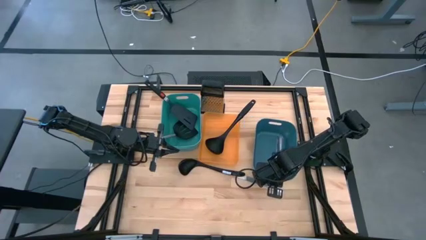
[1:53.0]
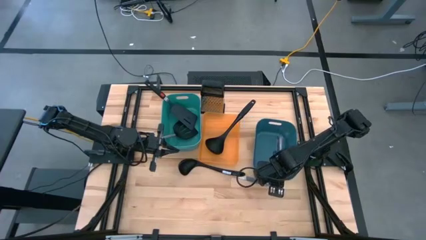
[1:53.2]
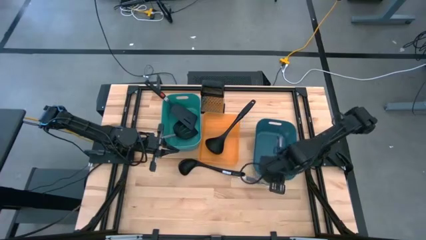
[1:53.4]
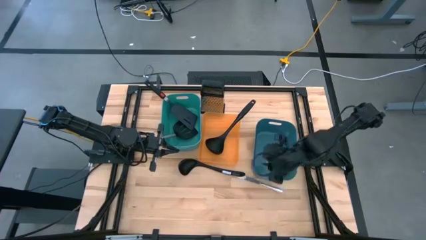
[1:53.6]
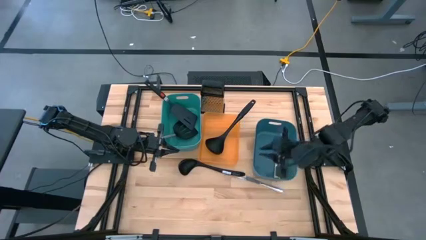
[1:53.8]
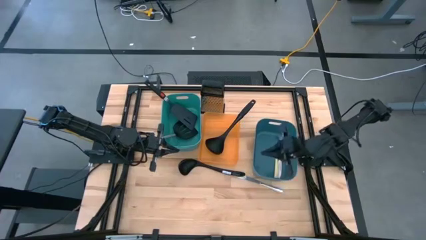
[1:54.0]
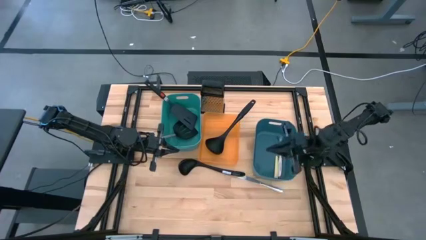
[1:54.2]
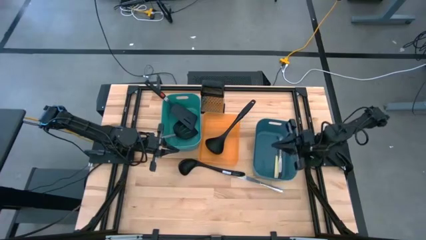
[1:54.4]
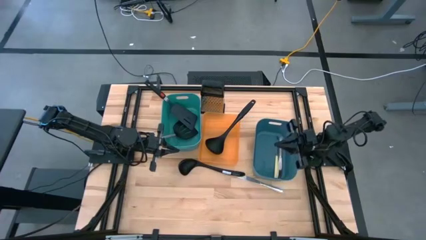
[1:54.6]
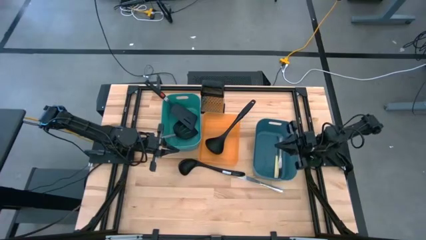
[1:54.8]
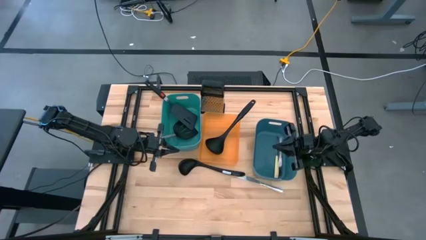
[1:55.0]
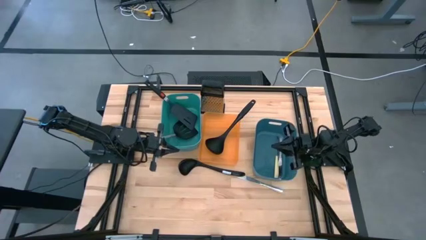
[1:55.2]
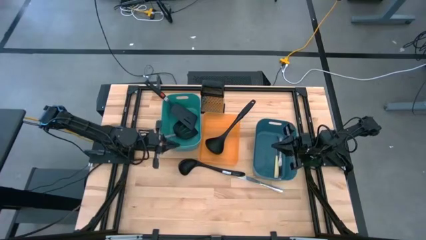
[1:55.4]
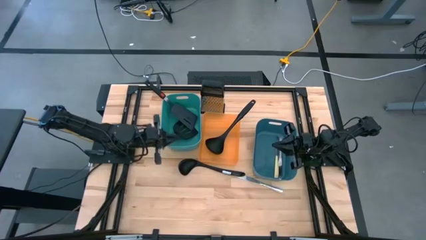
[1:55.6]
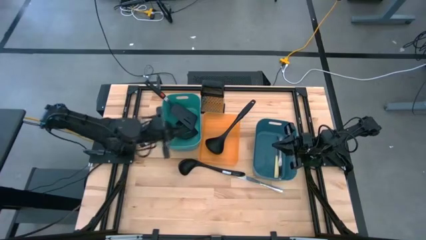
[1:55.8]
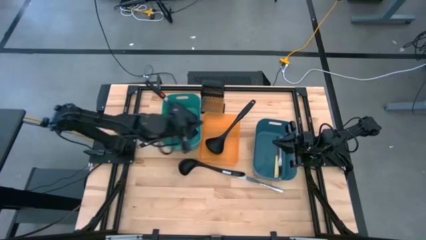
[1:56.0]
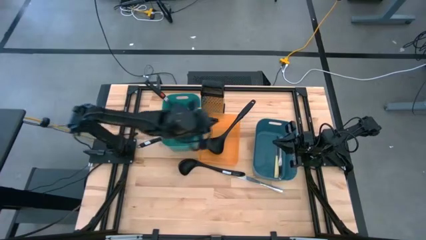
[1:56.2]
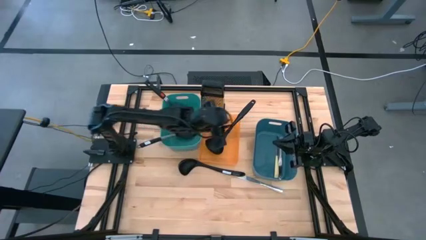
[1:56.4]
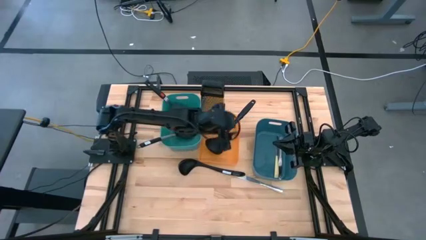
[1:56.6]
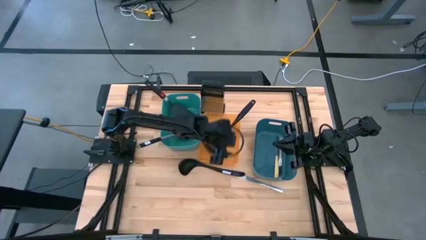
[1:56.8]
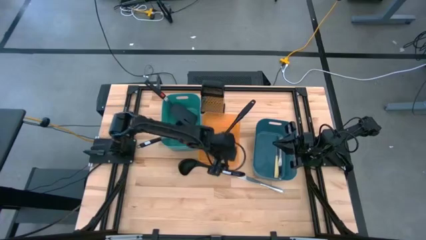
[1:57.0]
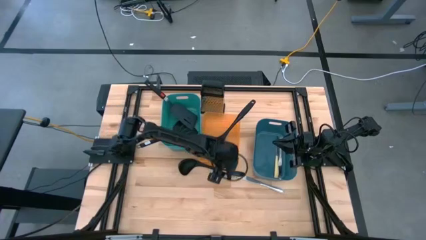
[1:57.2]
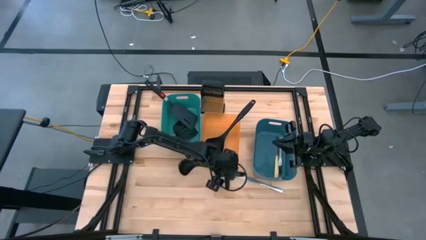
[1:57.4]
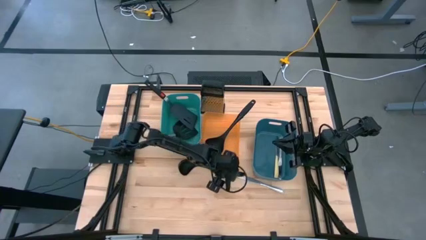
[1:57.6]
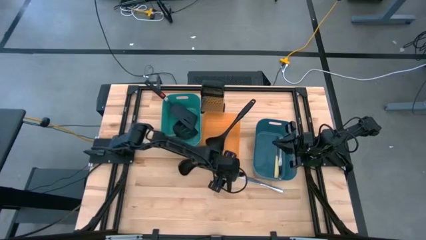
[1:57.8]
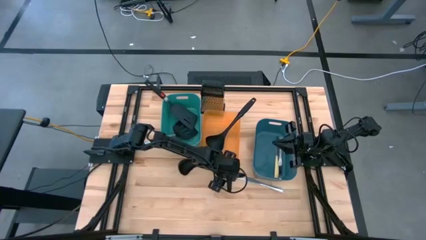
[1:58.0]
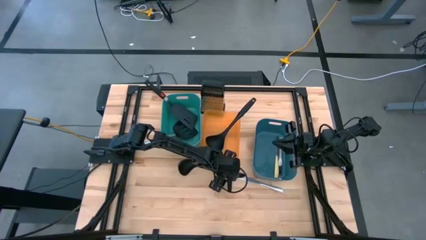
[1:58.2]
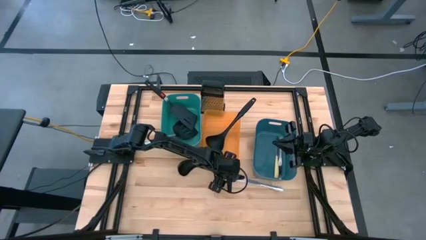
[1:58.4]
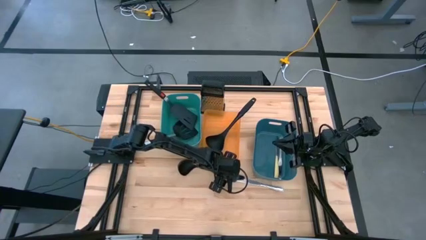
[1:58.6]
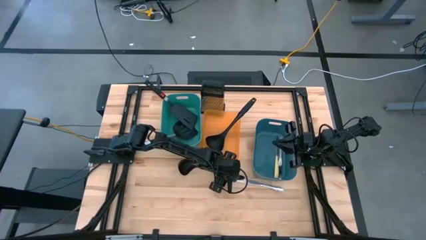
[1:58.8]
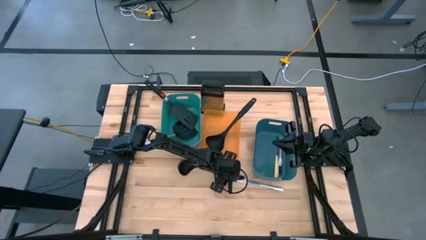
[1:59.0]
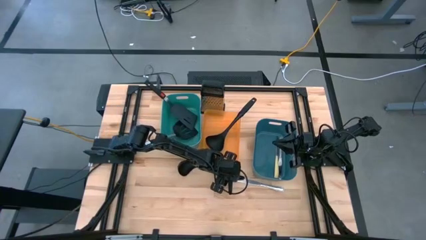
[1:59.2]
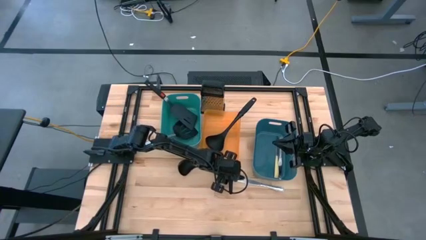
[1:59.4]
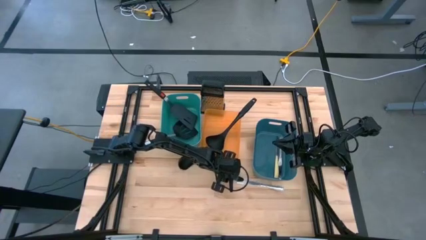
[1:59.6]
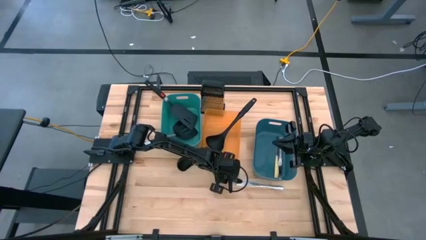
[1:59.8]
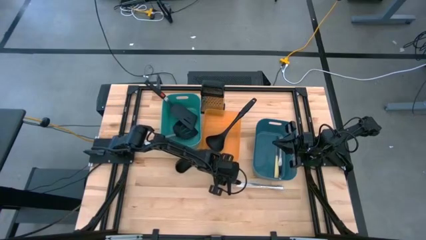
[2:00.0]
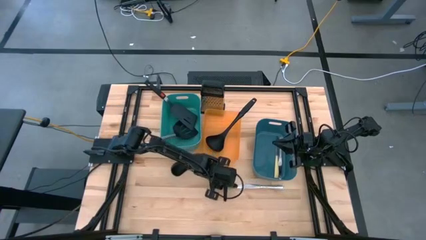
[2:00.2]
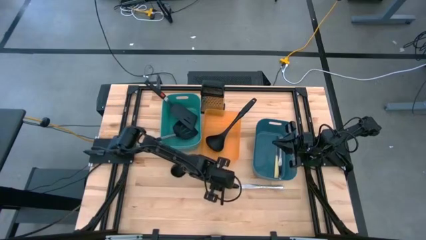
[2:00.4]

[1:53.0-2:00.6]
Task: Pick & Place Kitchen Items
Put the black serving spoon into the orange bin

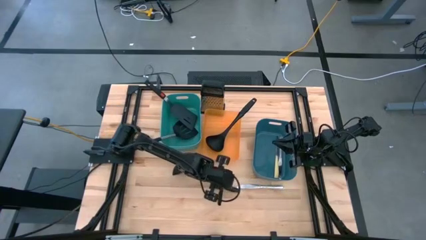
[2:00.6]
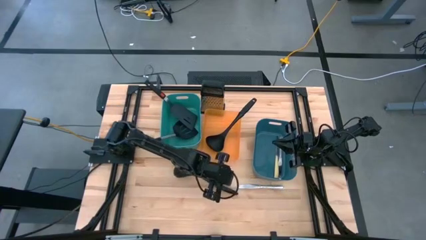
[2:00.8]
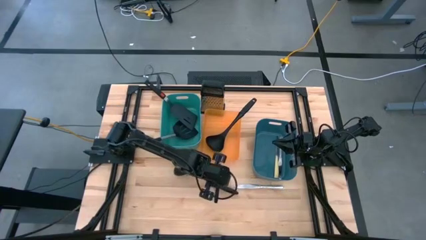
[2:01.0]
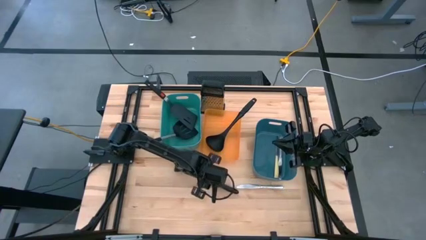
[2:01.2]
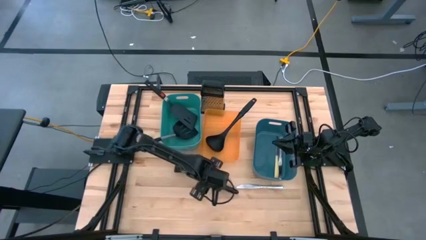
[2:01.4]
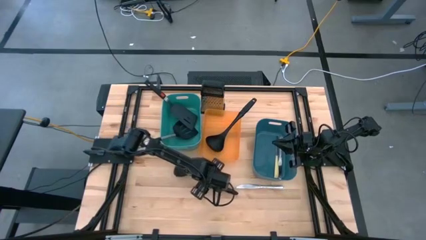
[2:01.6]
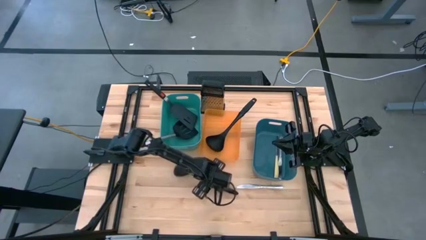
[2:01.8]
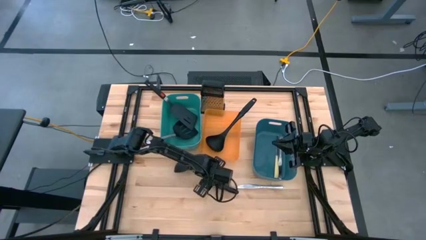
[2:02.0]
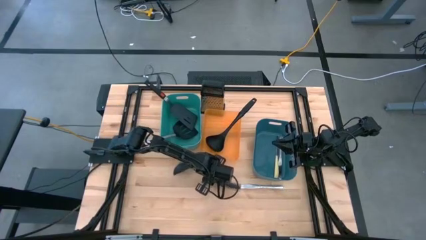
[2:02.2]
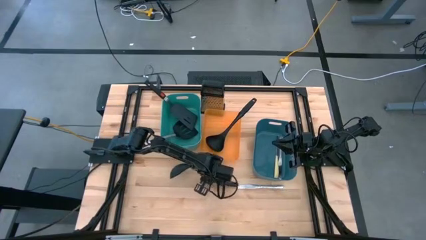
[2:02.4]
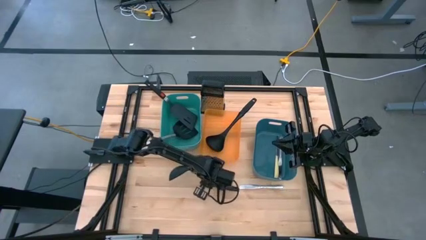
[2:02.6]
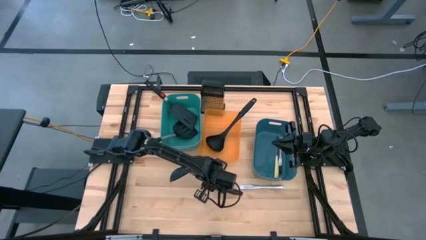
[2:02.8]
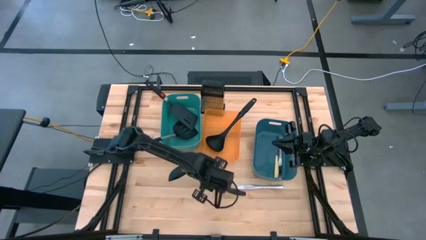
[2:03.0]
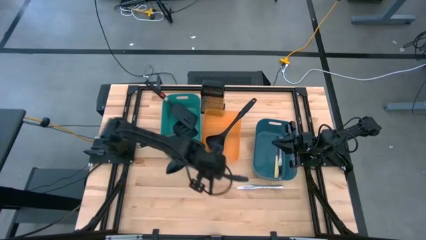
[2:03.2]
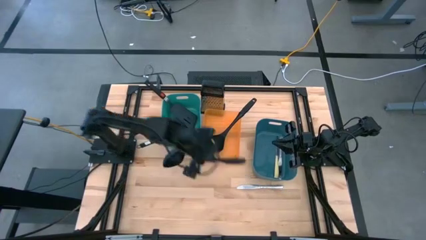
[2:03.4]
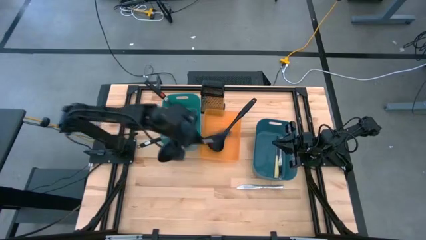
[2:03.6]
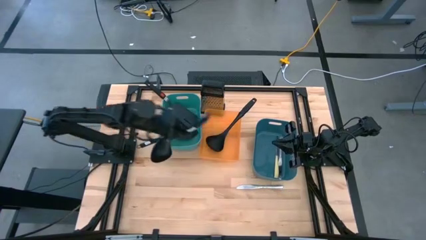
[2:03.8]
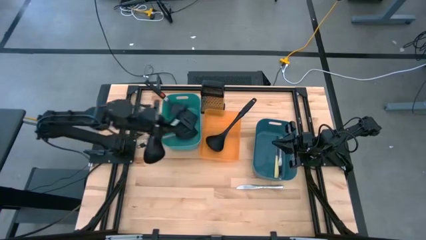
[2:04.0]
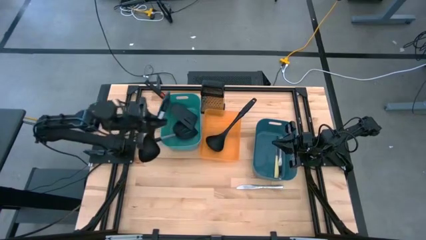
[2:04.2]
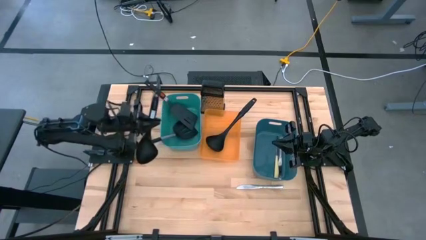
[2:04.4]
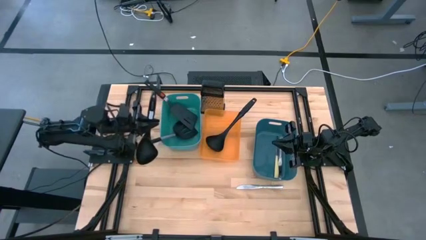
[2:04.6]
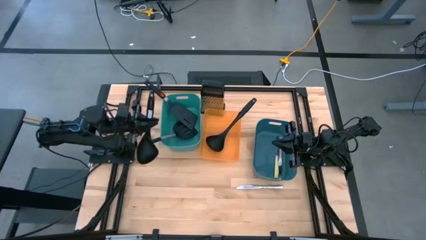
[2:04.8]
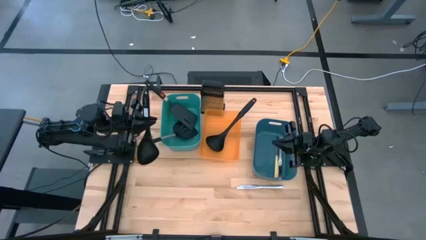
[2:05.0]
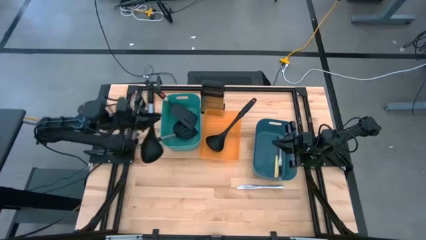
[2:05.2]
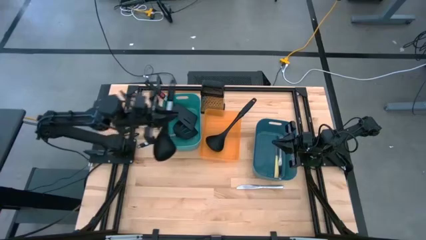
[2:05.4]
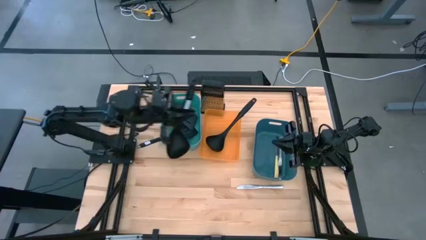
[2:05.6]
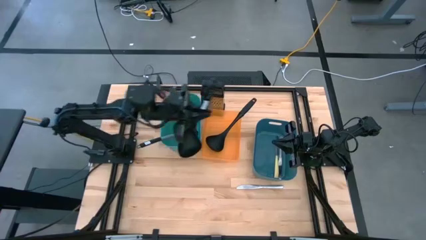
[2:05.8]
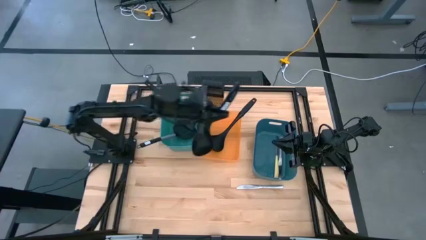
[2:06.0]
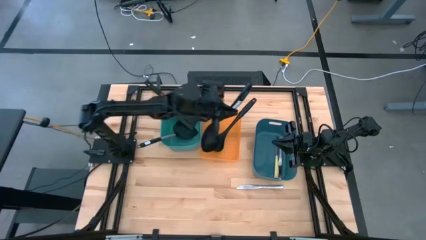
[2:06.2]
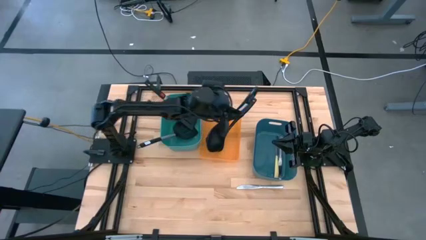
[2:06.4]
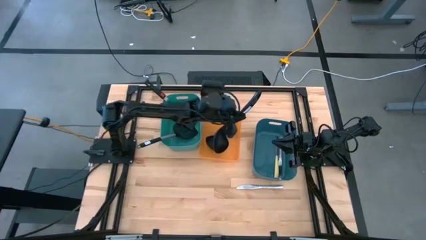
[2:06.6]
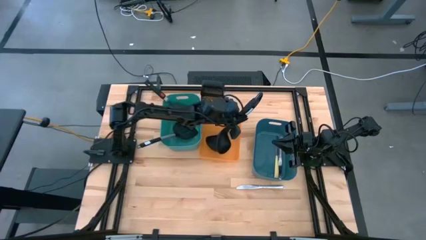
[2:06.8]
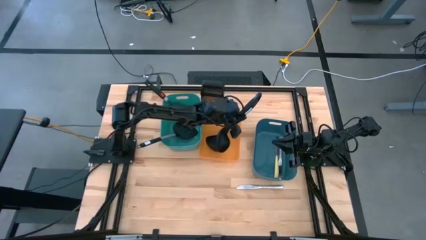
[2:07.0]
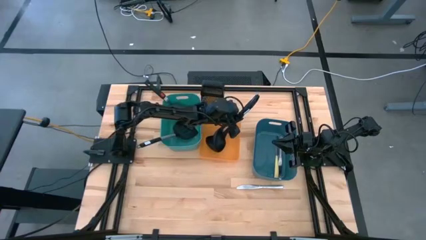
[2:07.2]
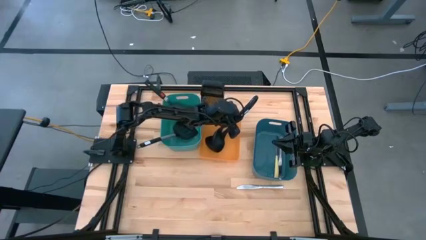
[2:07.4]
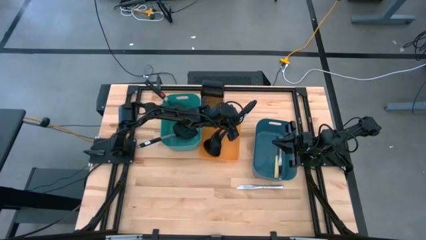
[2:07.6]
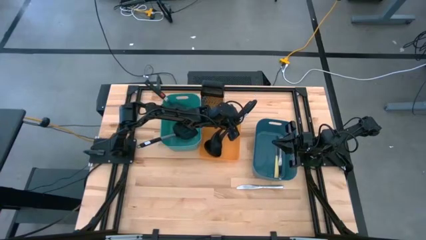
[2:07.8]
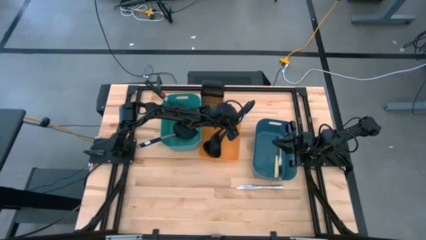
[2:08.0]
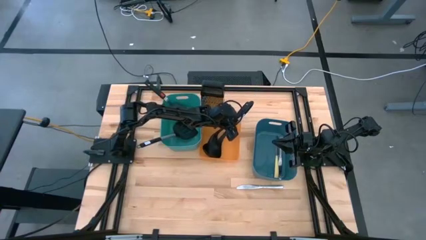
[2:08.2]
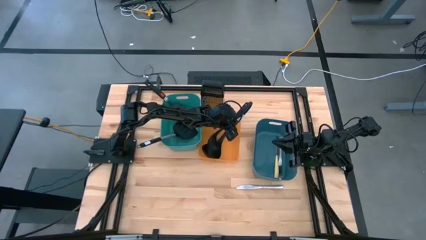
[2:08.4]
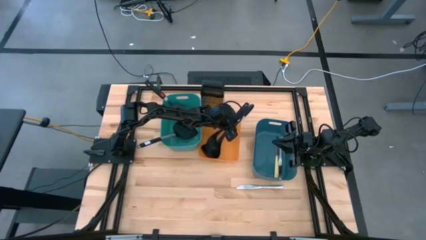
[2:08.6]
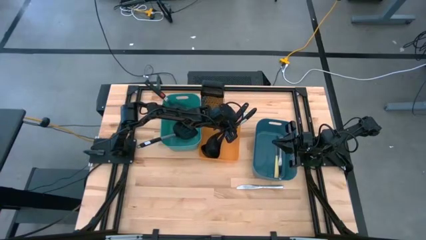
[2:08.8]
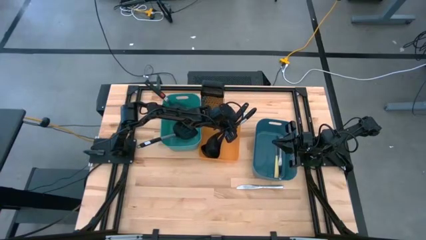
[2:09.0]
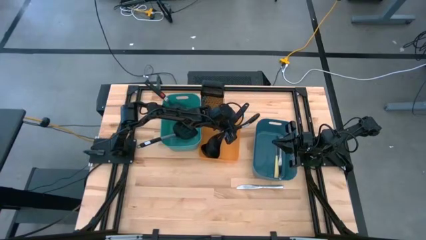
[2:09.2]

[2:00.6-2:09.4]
Put the black serving spoon into the orange bin
